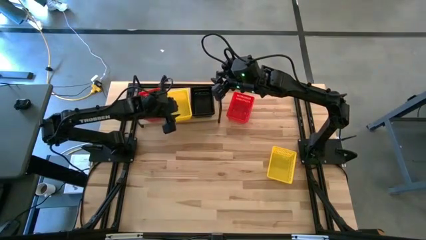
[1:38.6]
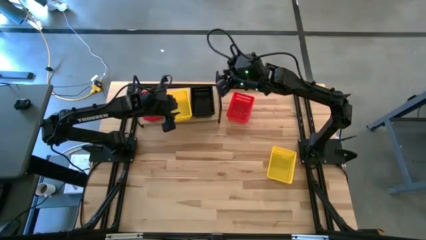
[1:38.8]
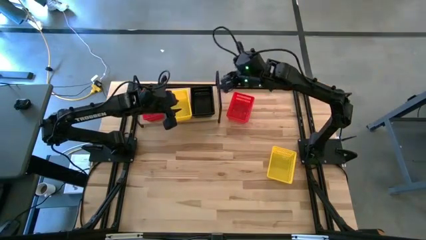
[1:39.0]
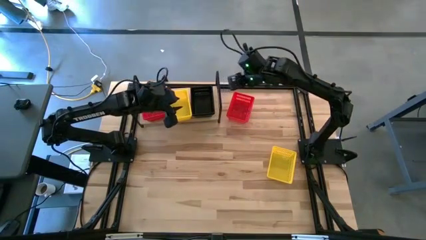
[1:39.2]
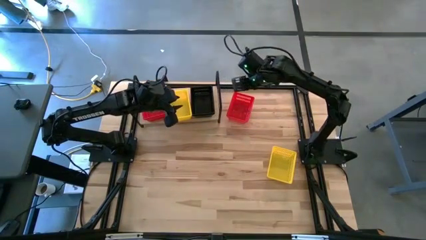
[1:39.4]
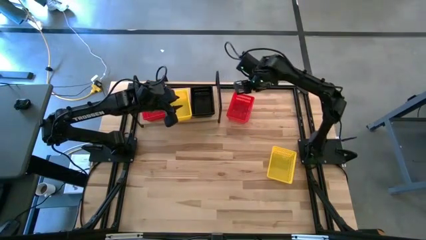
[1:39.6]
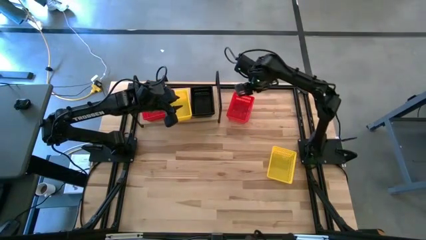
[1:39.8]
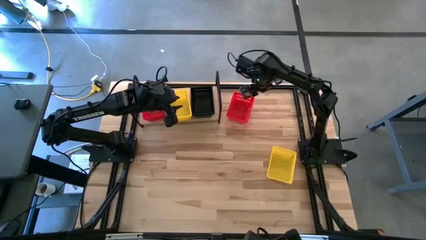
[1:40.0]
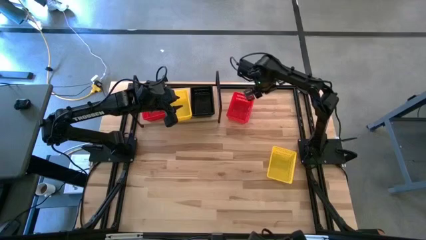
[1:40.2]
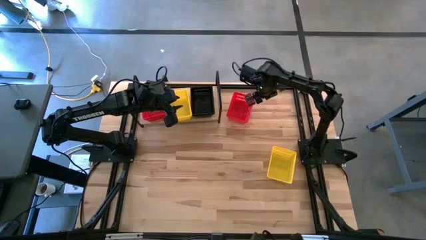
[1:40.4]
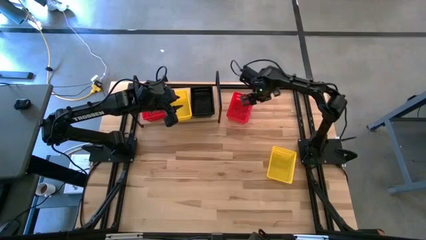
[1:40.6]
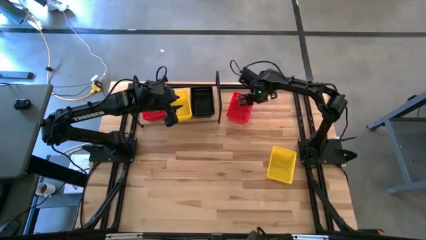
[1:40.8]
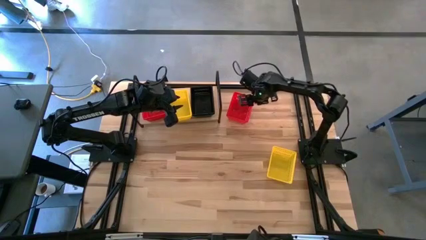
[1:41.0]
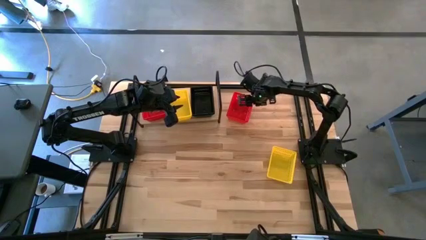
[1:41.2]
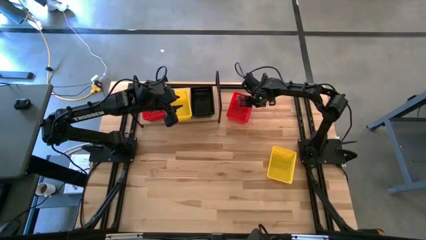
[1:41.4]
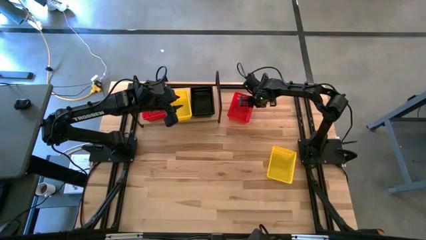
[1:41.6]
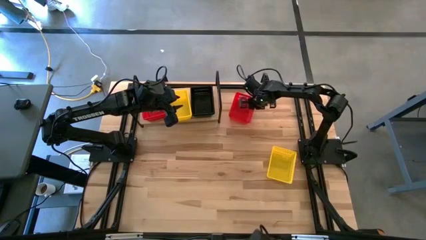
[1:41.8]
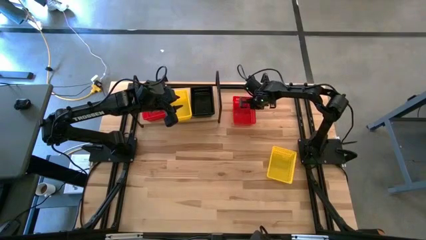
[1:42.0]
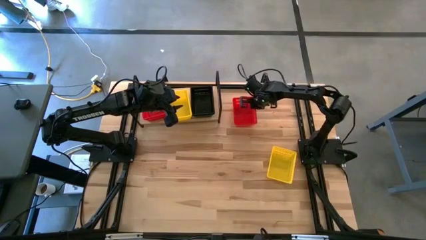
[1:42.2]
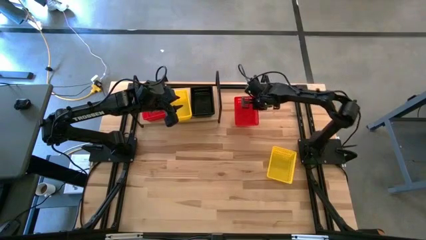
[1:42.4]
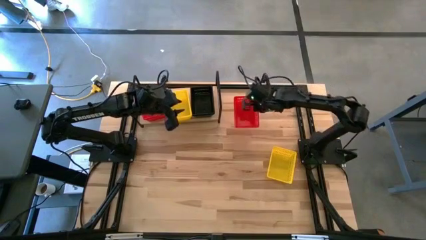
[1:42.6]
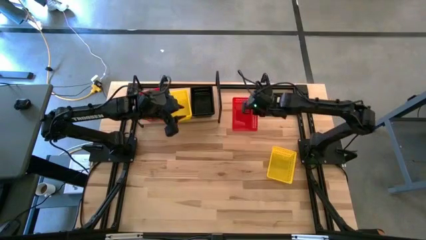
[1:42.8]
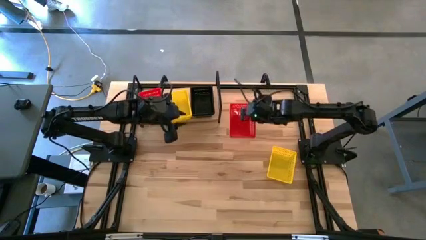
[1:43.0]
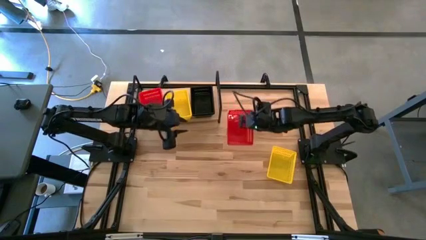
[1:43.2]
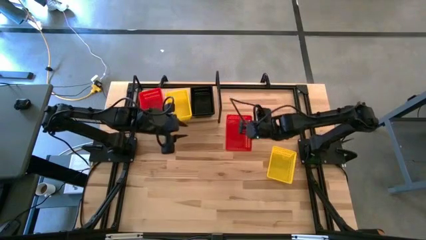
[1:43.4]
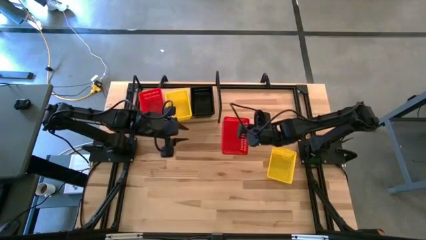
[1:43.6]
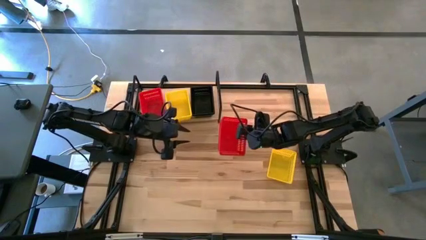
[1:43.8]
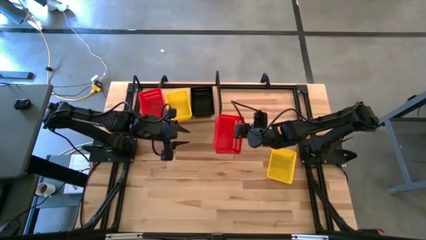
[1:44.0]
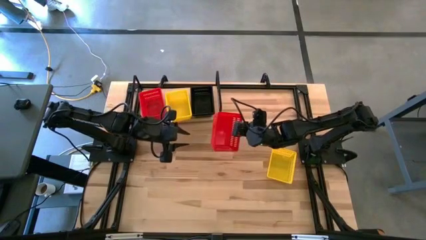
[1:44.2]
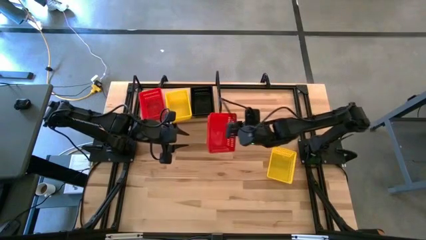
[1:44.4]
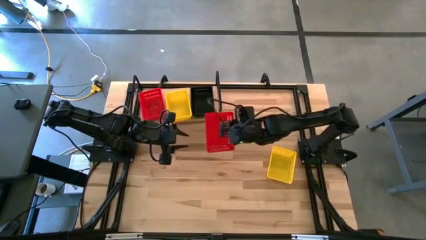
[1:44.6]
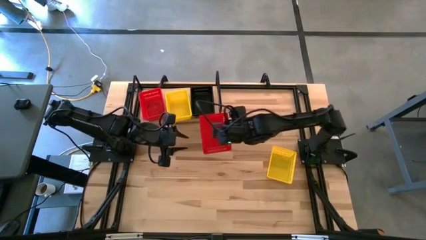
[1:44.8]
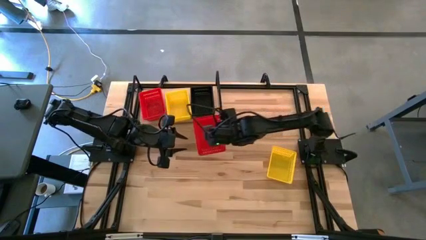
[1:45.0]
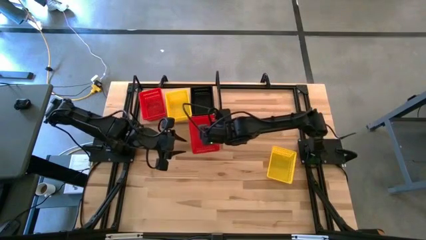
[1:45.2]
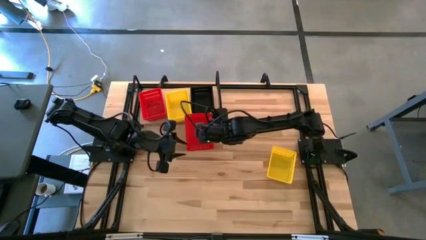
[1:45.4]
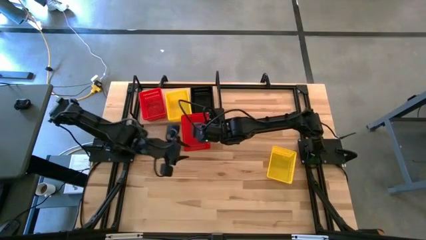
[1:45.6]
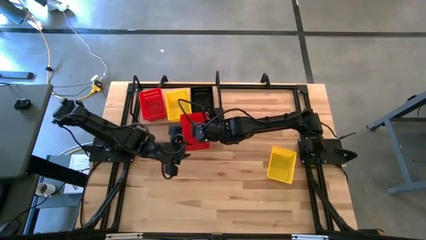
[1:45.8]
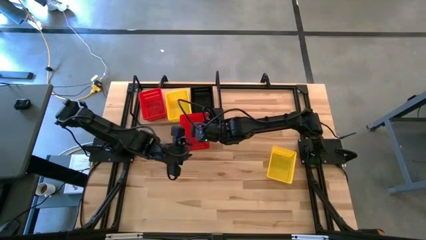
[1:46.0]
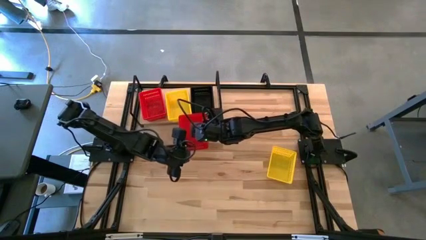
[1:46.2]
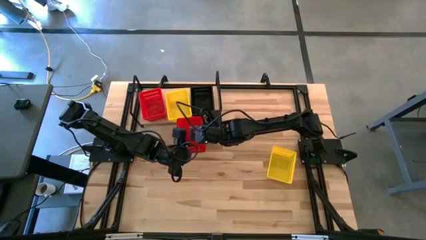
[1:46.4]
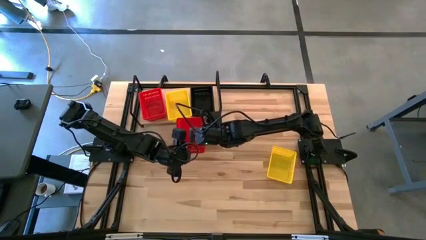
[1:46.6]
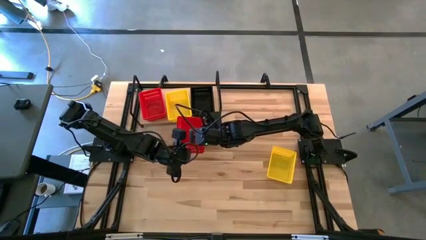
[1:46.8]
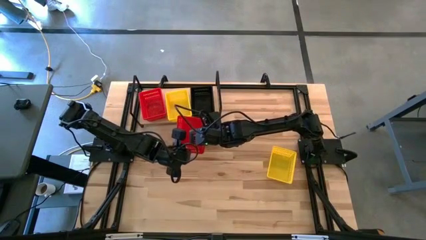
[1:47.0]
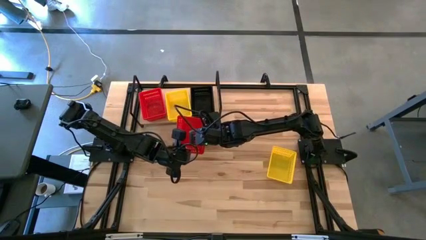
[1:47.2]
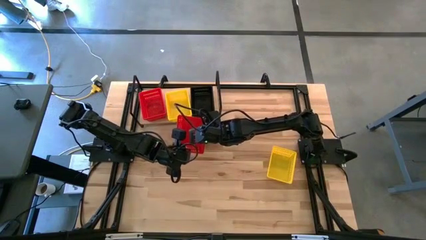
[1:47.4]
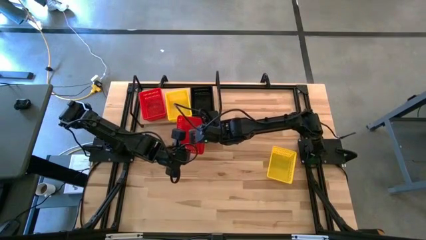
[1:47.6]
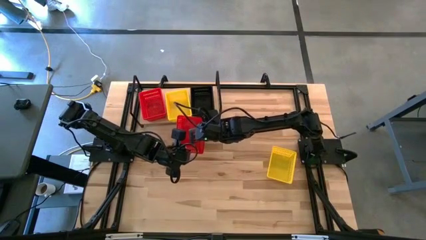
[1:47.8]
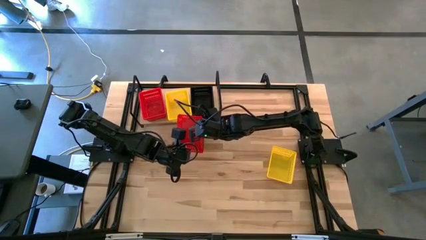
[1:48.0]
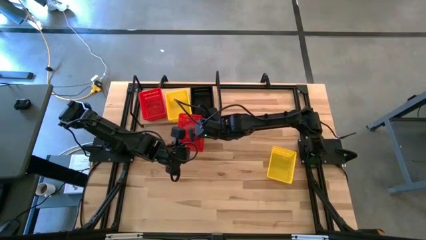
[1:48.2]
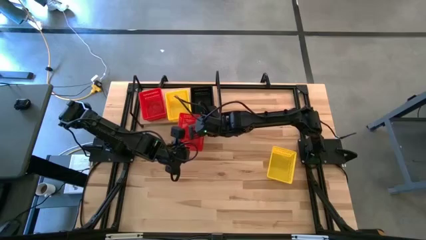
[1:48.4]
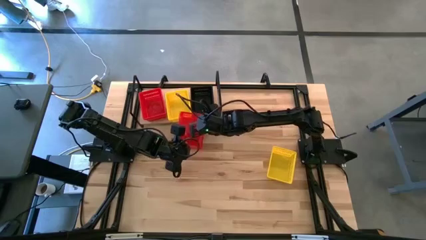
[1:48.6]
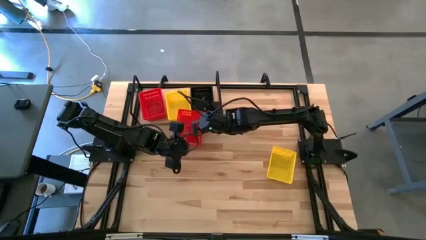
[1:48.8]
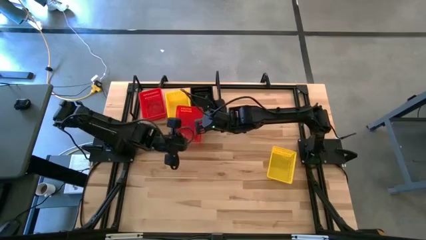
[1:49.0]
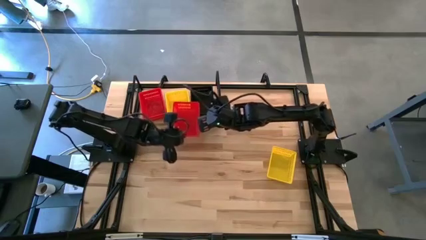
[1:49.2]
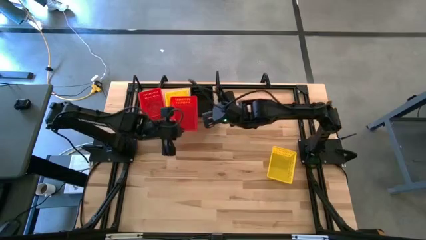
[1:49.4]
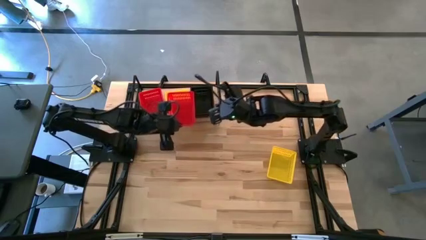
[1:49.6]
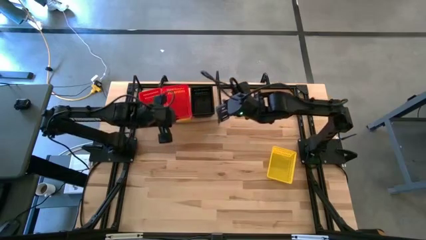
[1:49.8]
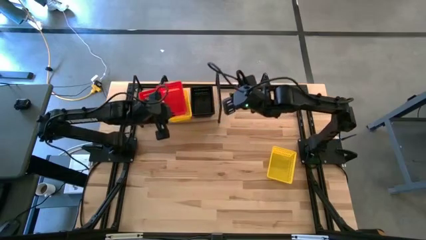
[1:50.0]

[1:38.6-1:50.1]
Task: Stack baskets on shelf by color
Stack the red bin on top of the red bin on the shelf

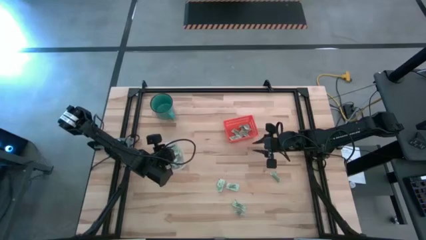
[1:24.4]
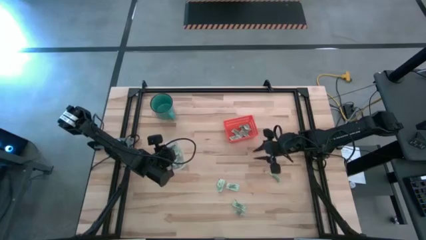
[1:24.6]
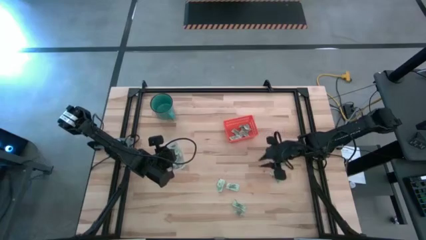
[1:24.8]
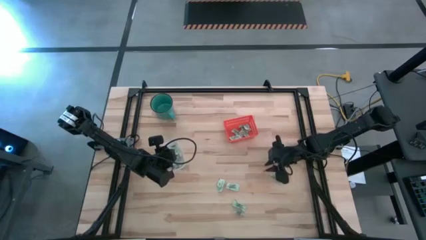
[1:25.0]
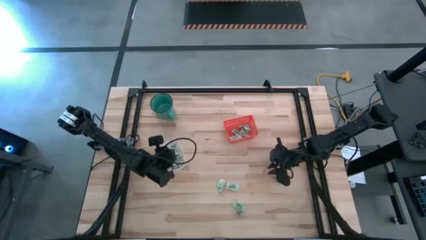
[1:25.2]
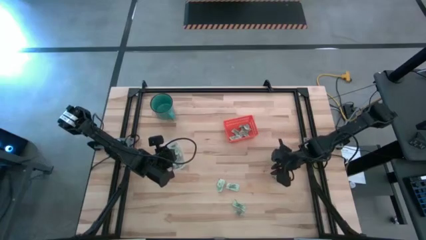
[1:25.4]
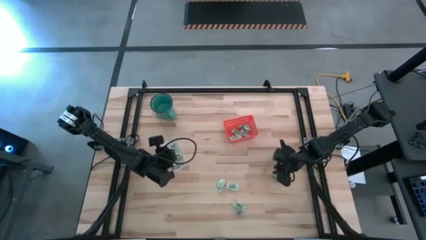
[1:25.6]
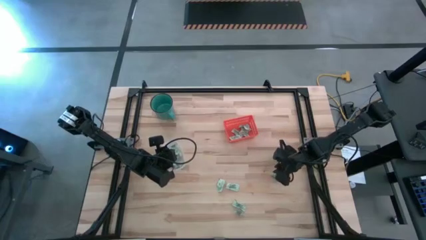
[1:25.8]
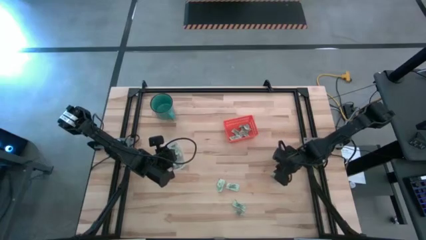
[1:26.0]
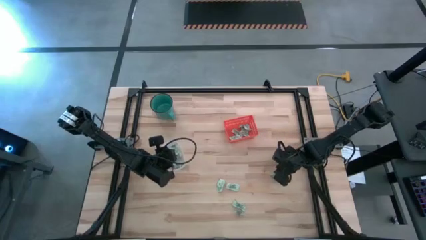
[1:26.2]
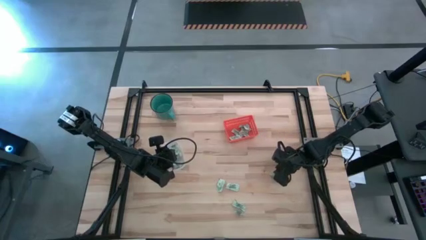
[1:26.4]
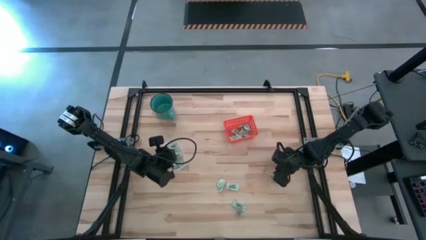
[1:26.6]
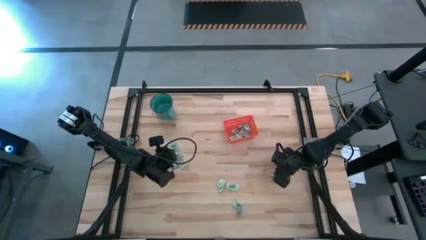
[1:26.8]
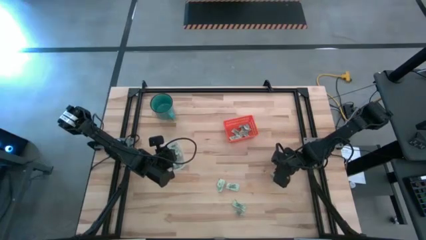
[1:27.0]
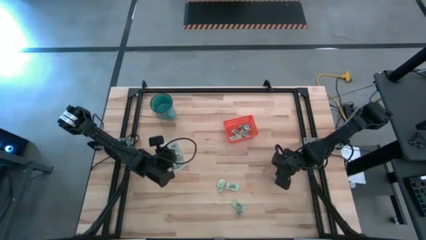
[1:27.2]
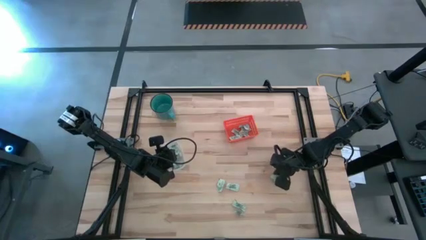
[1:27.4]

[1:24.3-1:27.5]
Task: Pick and place items into bin
Put the light green stevia packet into the orange bin

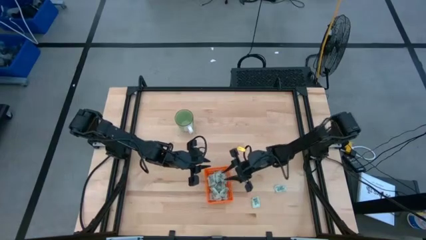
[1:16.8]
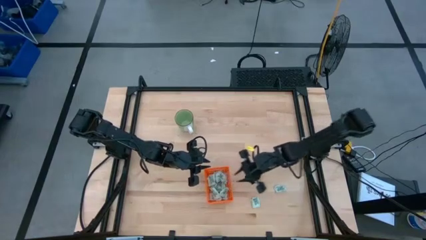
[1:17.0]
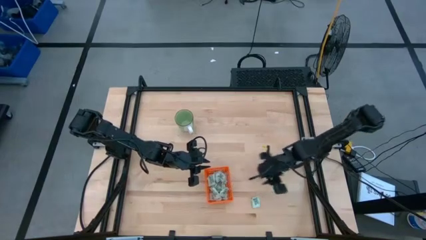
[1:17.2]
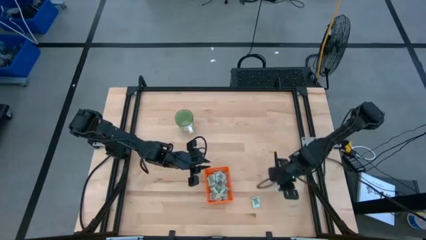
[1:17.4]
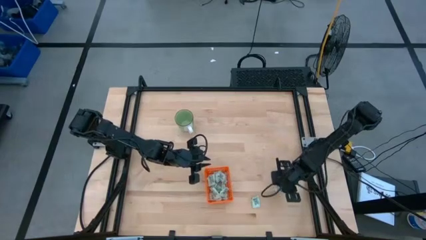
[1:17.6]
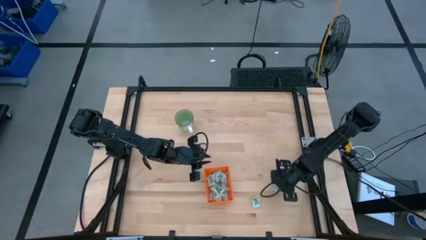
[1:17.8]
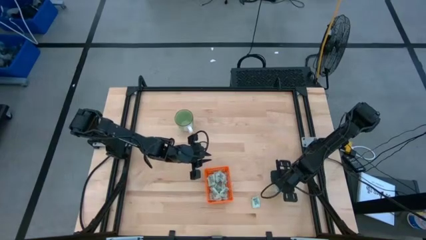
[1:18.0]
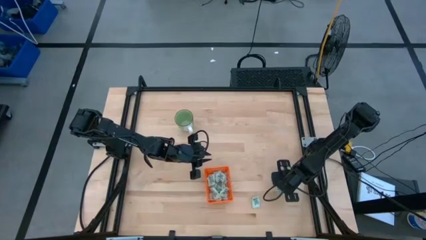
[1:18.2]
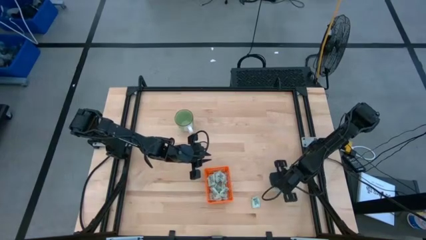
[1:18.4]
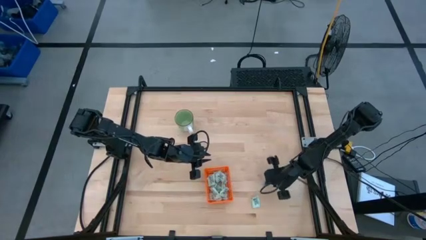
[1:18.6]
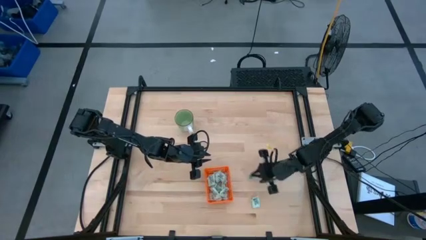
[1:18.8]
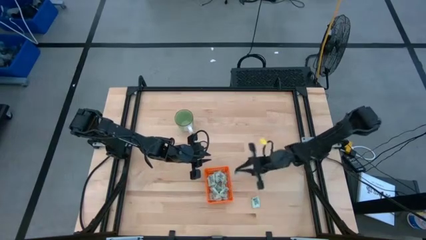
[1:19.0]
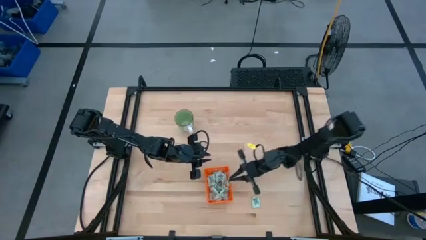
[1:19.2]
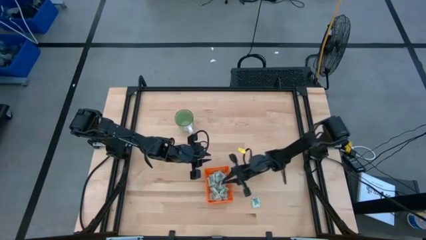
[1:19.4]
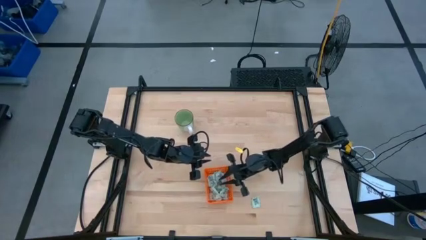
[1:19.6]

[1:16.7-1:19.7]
Task: Pick and place Stevia / Truvia into bins
Put the stevia packet into the orange basket
